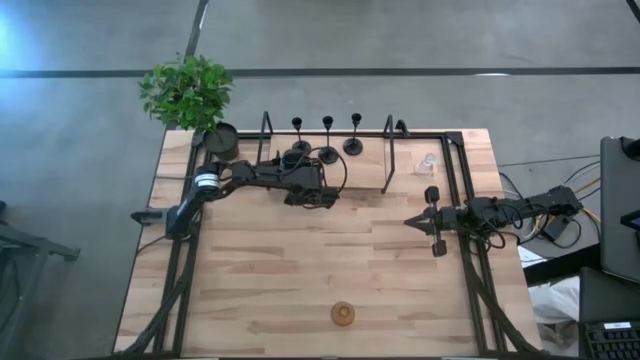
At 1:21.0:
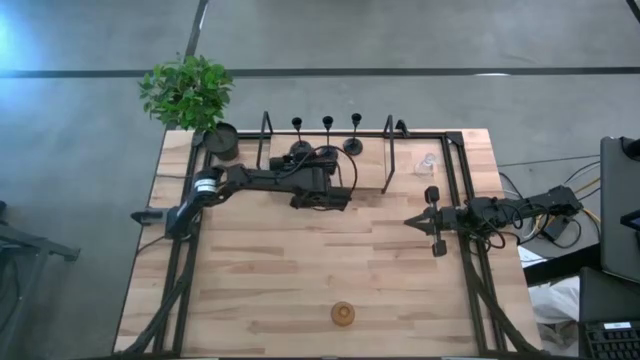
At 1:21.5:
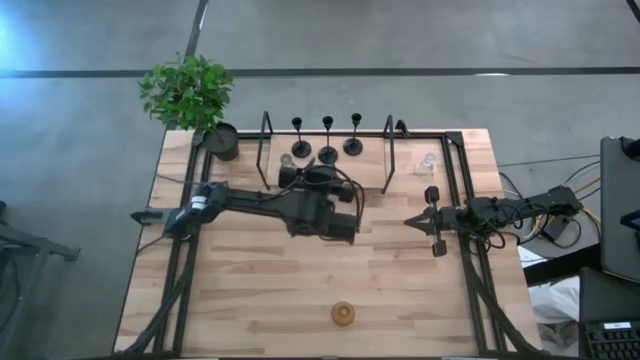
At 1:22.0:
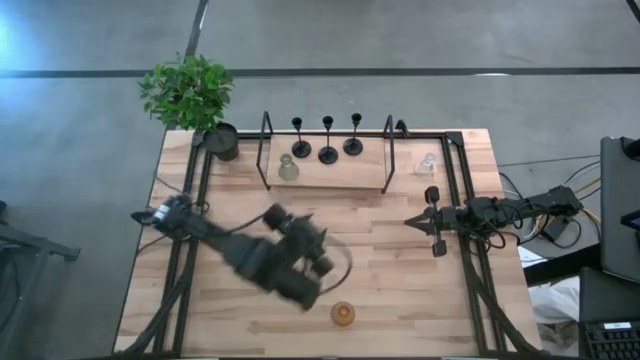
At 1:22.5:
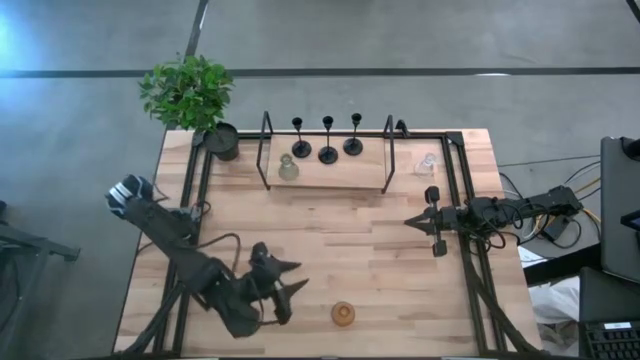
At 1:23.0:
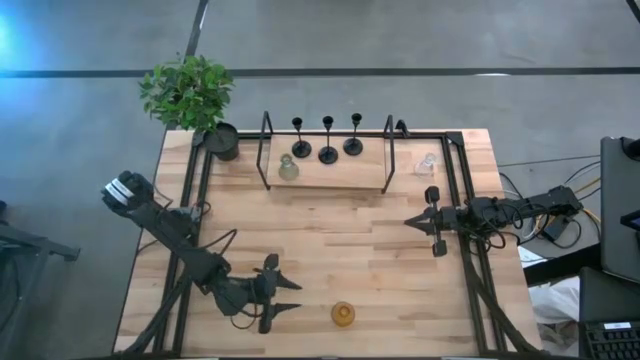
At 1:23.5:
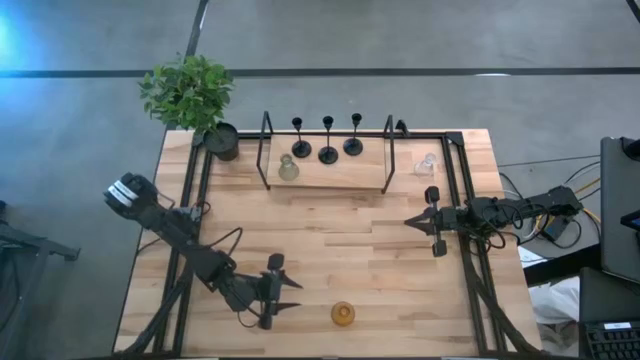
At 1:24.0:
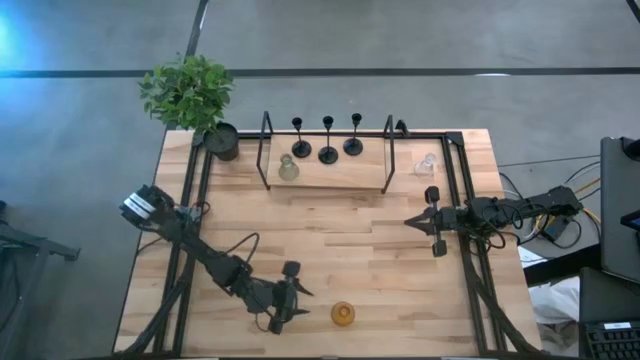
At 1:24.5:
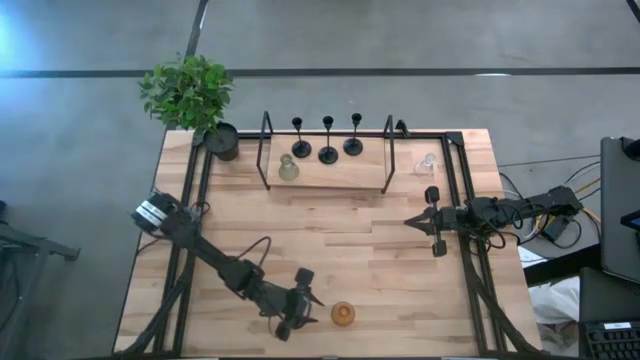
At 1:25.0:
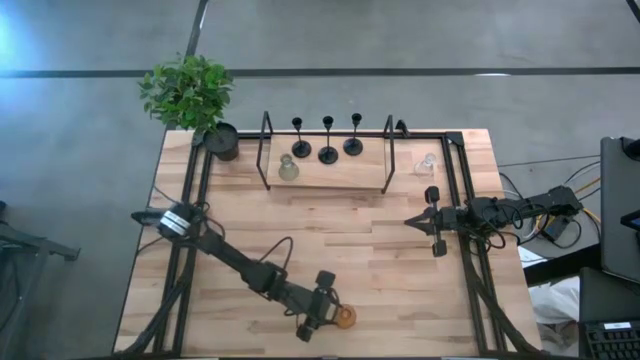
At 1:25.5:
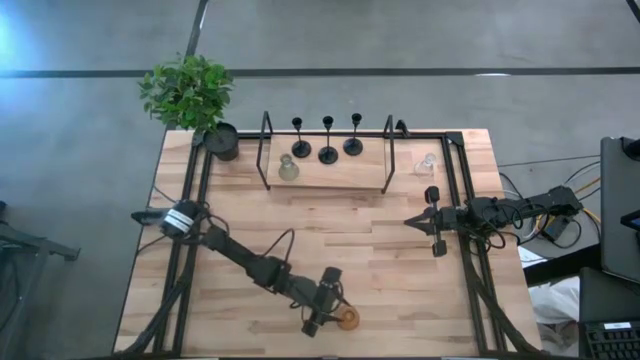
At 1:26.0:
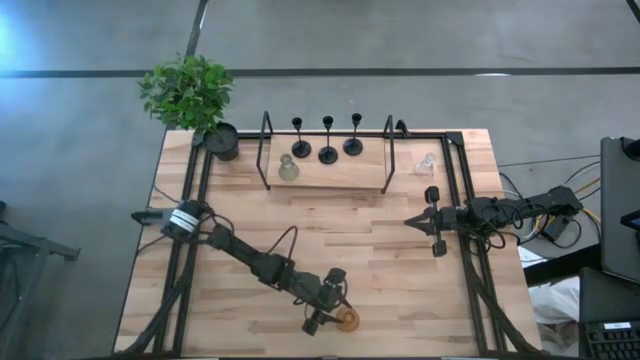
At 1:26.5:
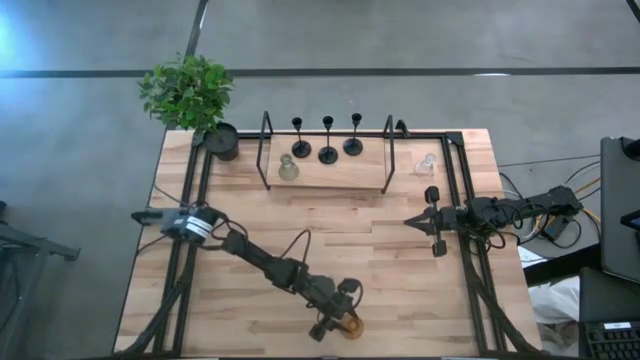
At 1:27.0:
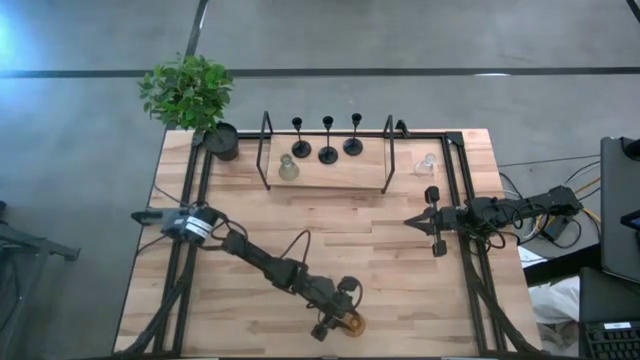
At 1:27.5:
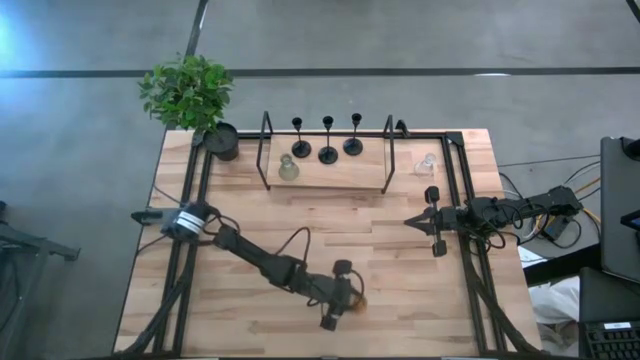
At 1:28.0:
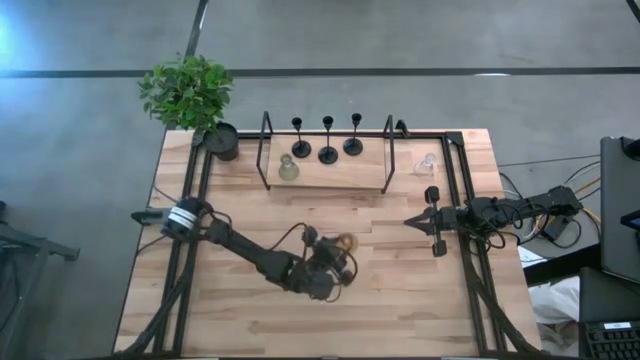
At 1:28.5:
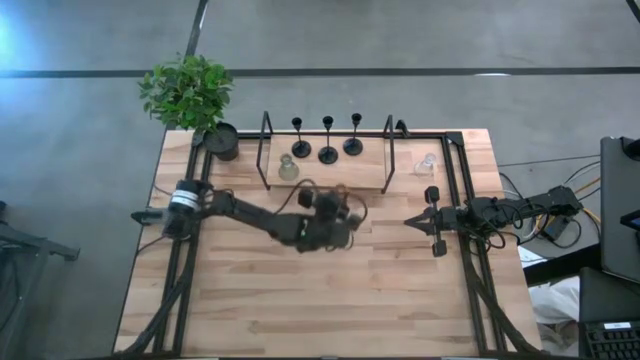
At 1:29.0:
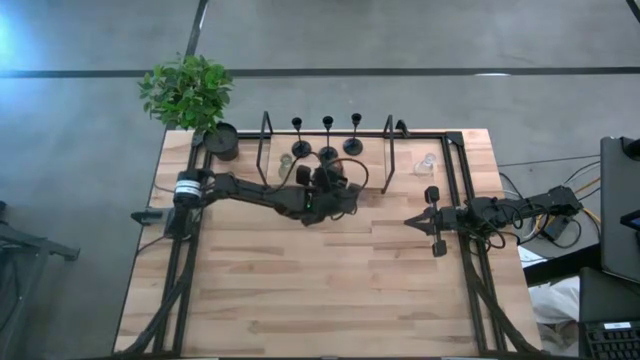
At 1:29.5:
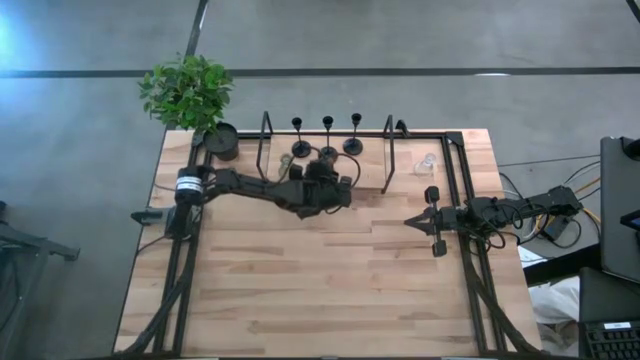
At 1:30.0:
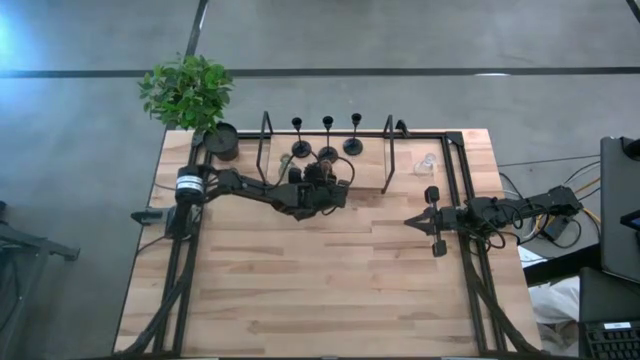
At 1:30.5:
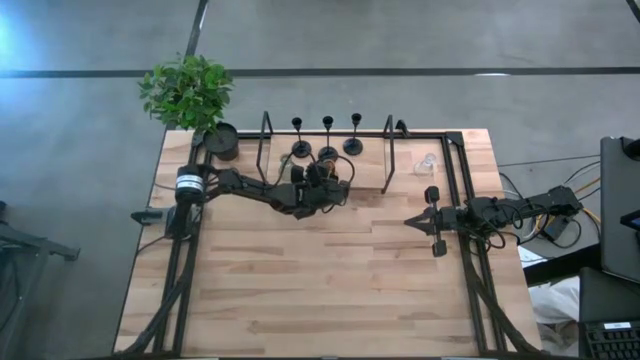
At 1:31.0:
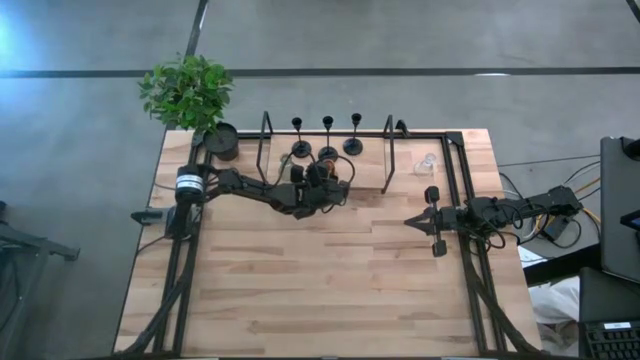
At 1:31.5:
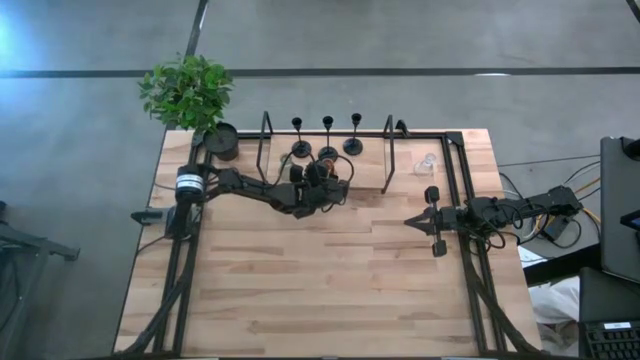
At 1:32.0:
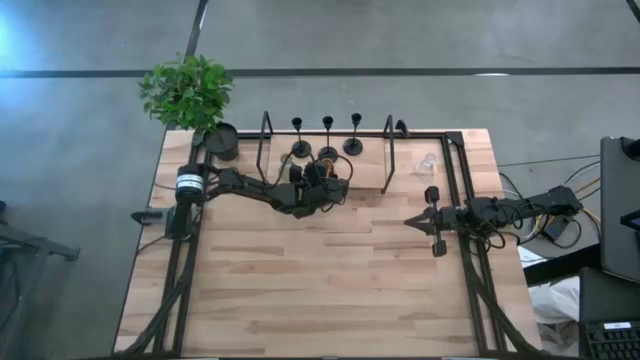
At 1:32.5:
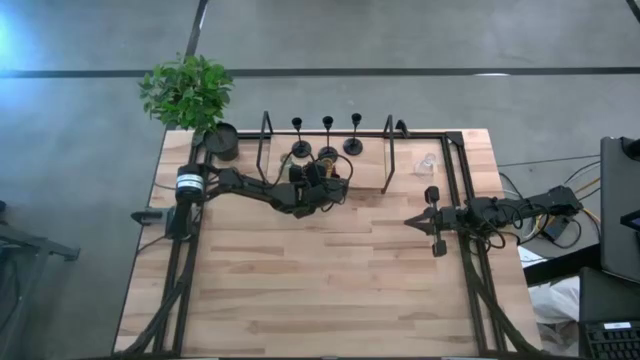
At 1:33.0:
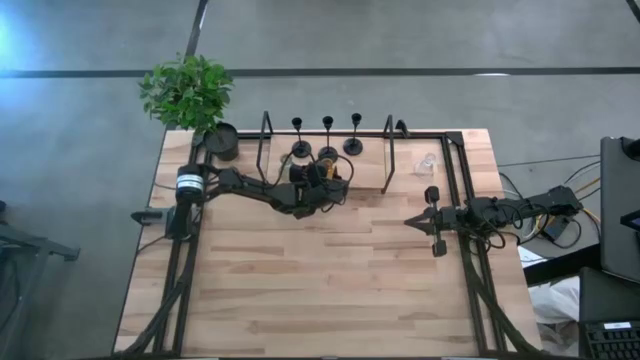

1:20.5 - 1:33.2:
Task: Pick & Place candle stick holders
Put the yellow glass candle holder on the shelf aligned with the other glass candle holder

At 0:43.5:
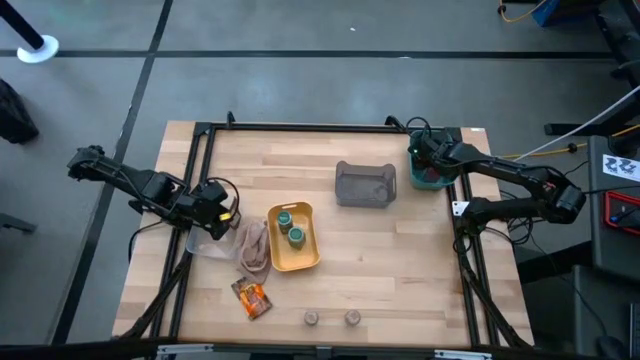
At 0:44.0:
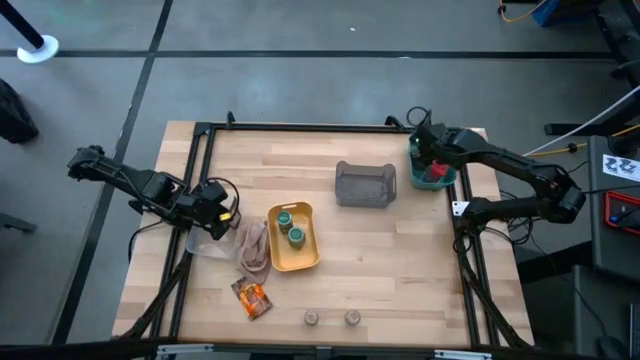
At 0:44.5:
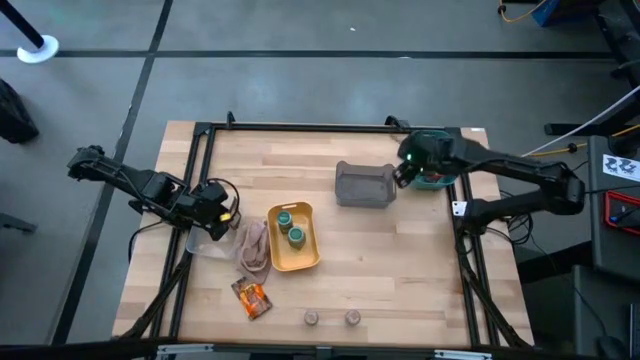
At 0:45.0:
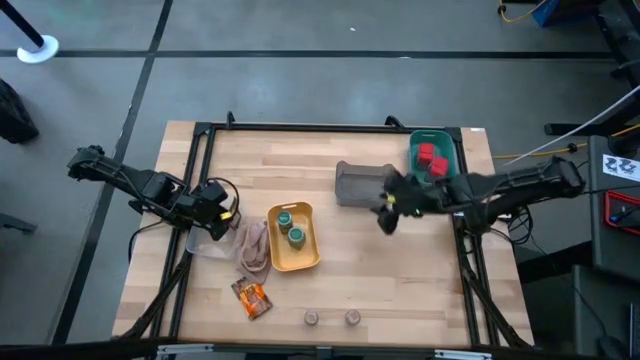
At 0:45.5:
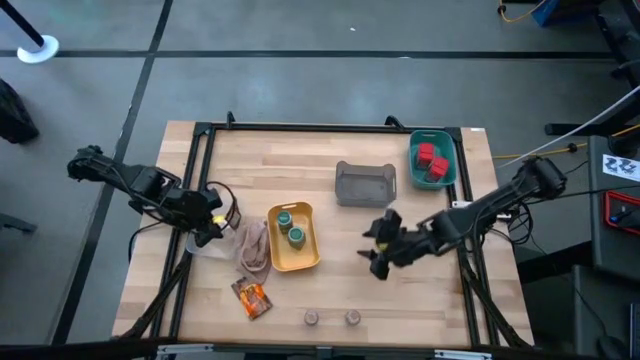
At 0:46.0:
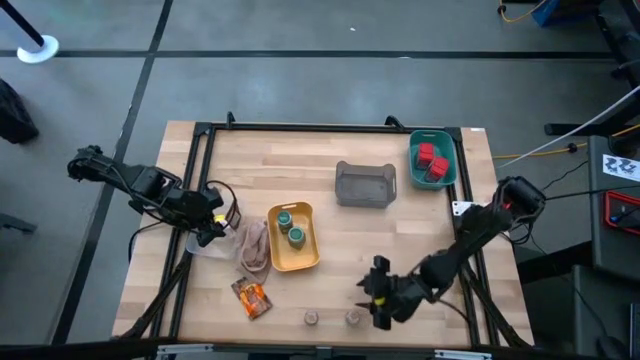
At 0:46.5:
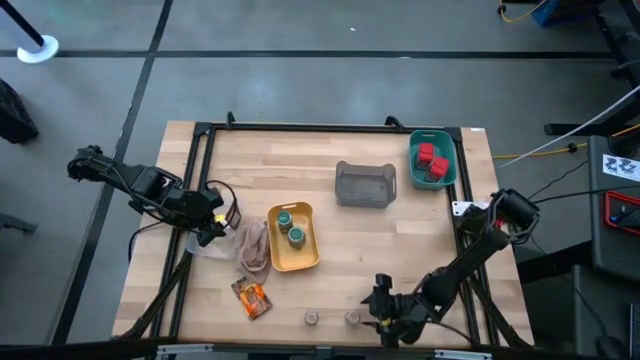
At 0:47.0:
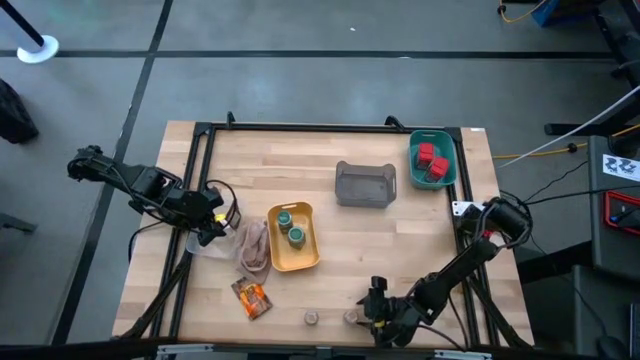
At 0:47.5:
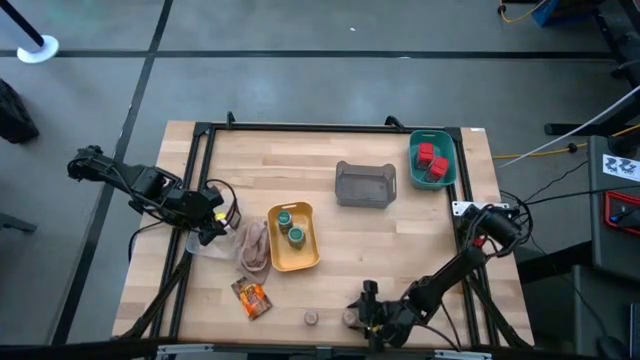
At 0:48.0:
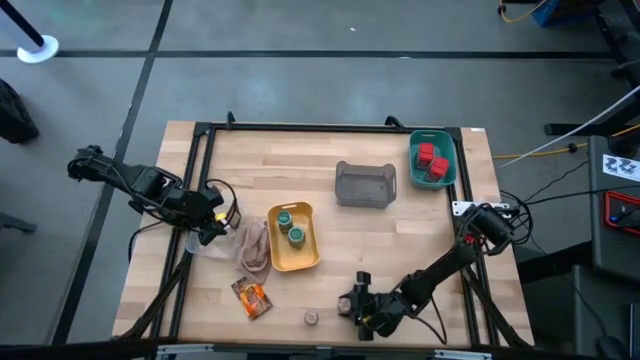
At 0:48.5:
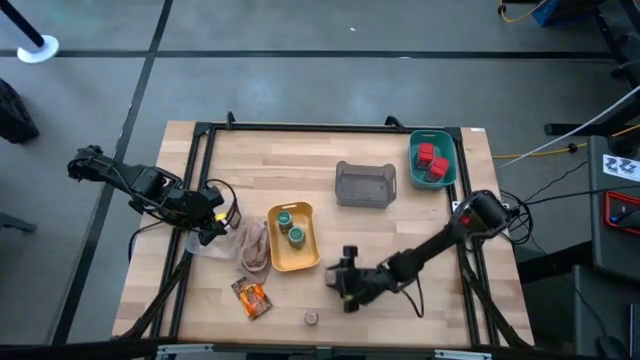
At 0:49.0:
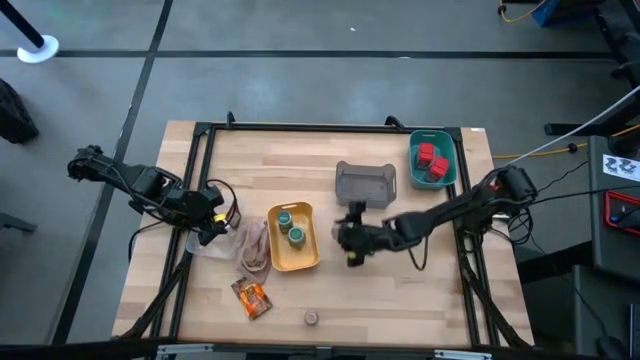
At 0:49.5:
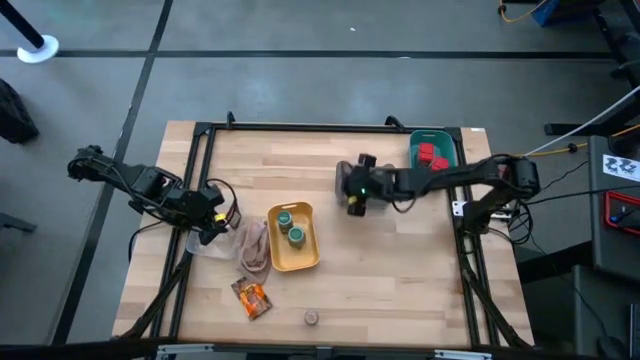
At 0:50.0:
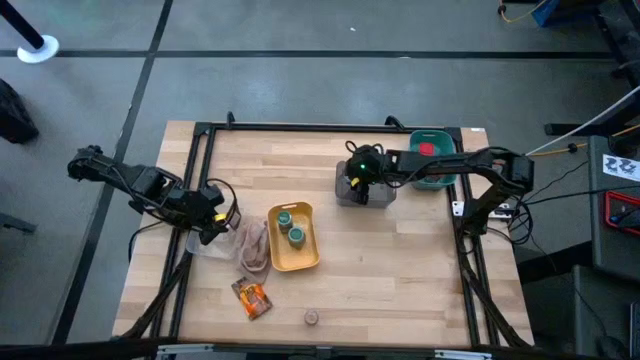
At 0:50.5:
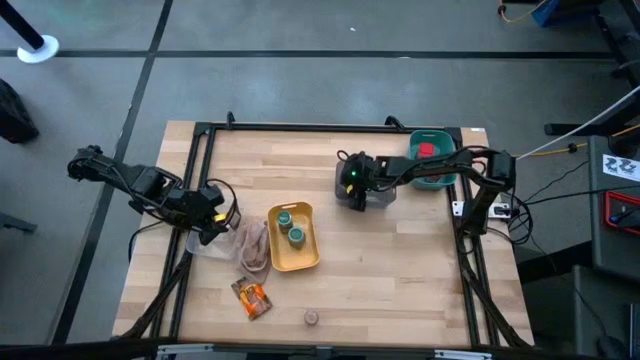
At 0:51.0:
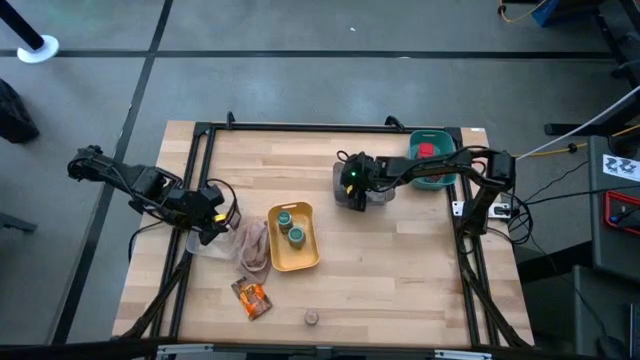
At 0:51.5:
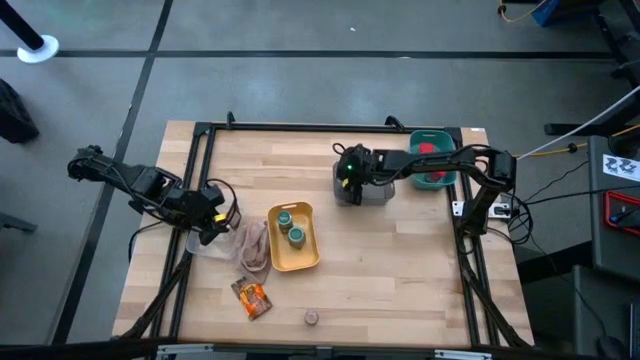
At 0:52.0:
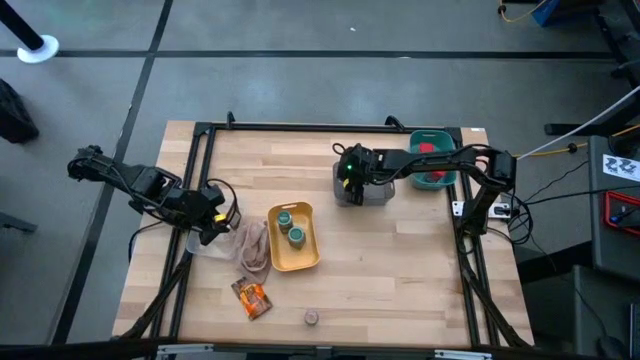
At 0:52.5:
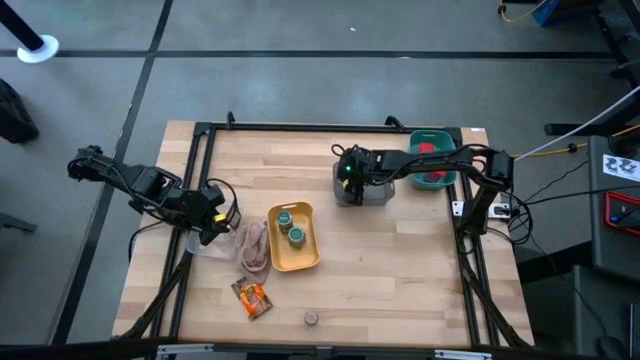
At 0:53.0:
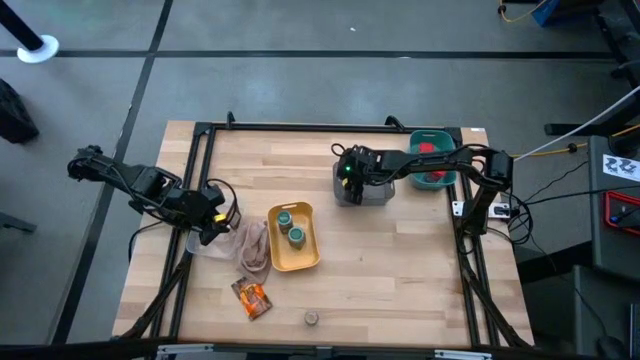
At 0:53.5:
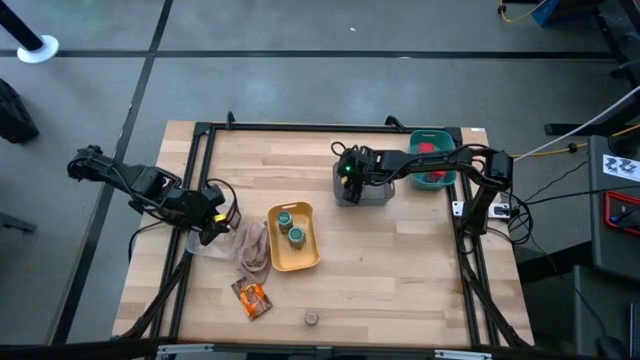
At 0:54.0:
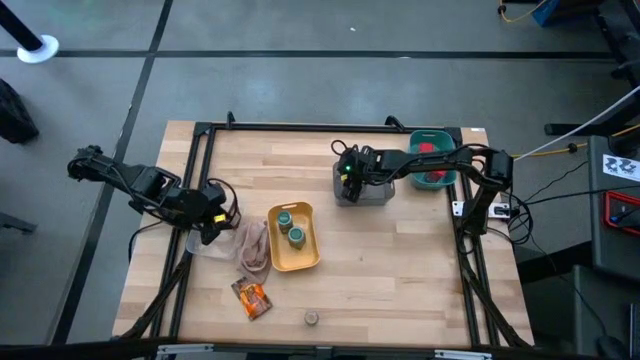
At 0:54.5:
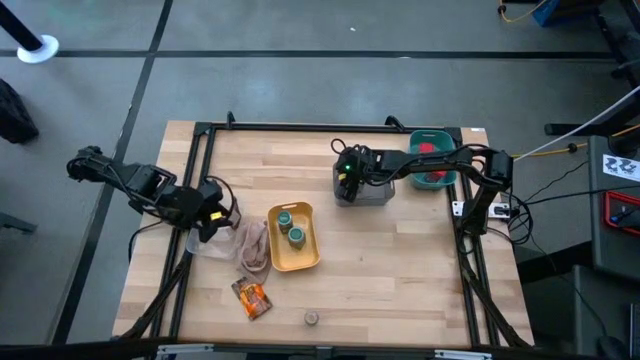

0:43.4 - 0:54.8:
Task: Sort spices by type
Put the right brown seasoning bottle into the gray bin
